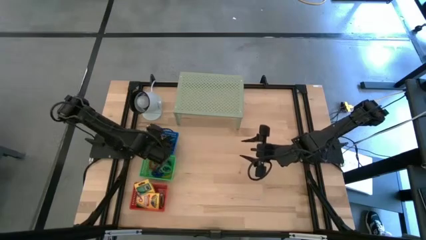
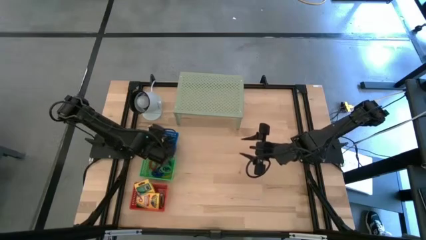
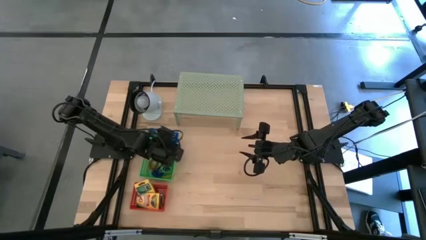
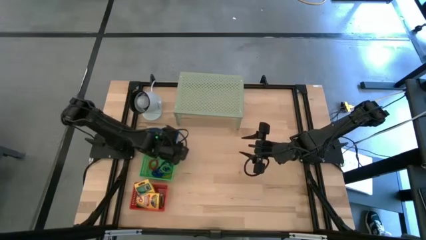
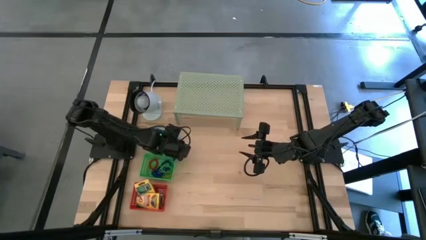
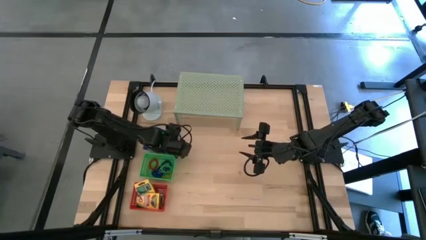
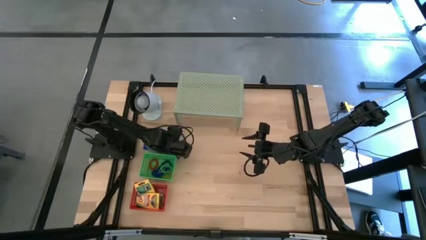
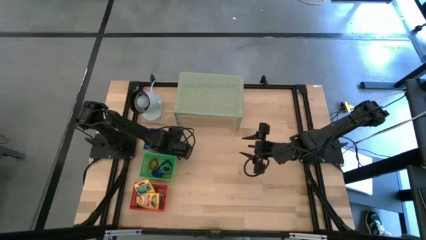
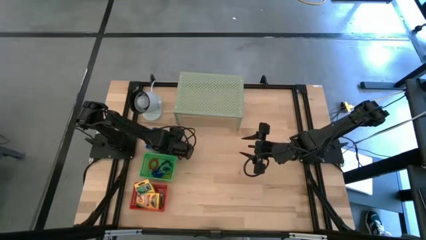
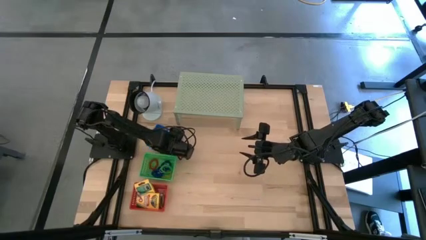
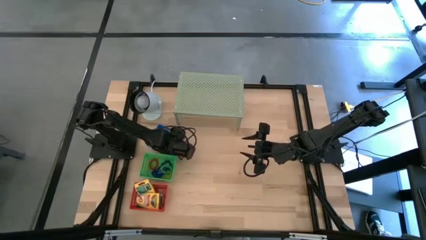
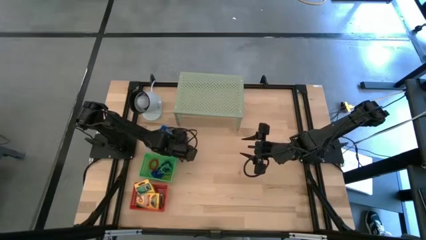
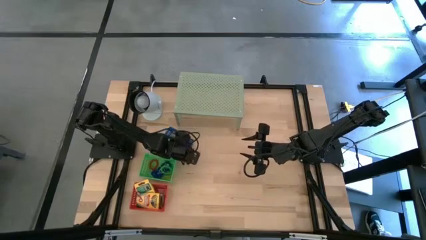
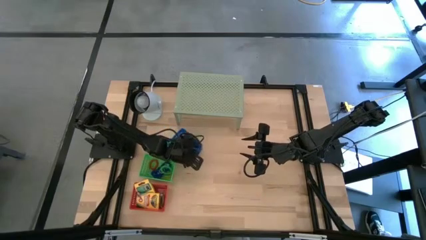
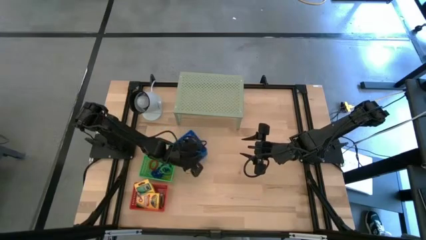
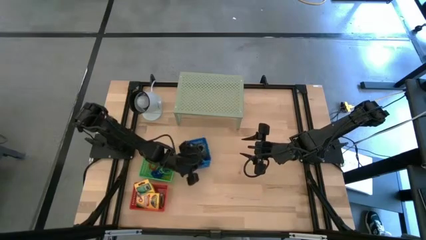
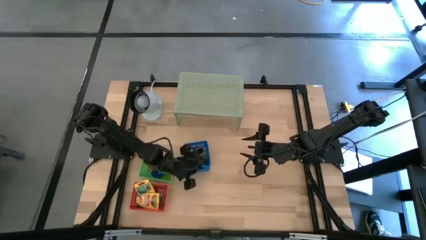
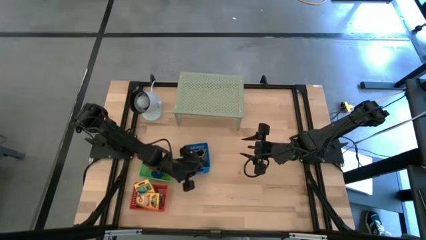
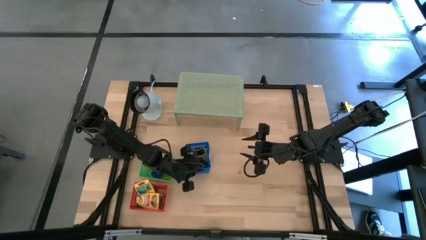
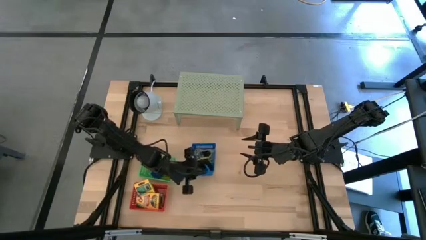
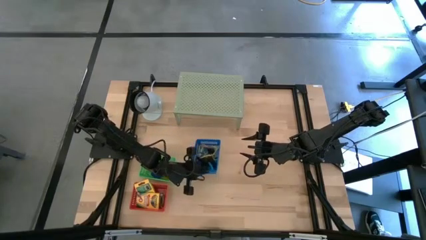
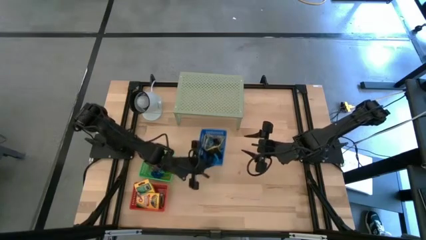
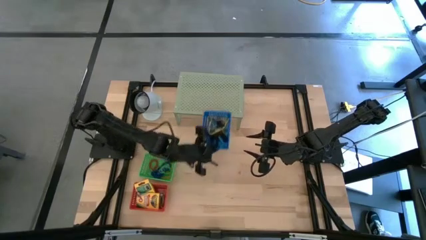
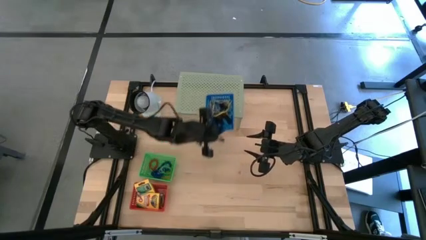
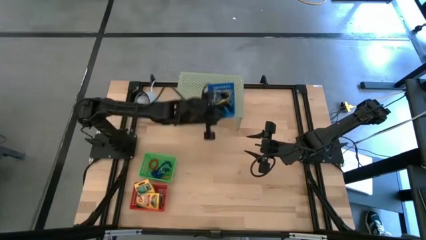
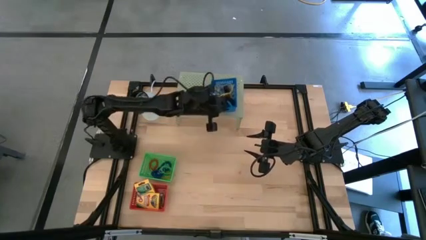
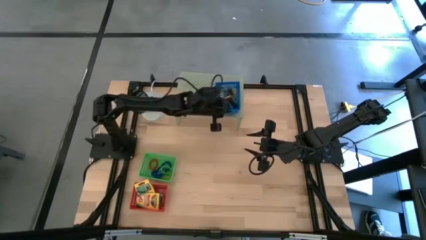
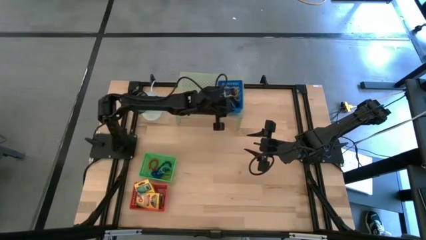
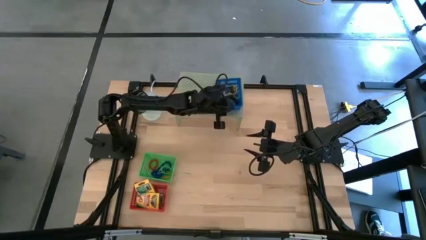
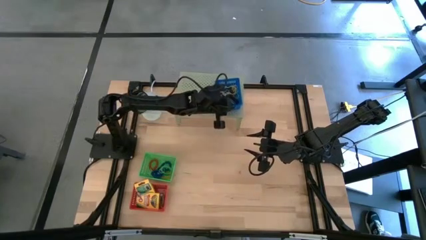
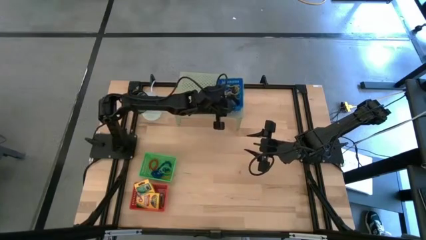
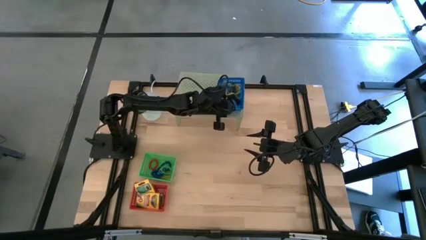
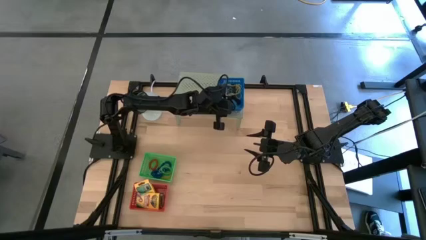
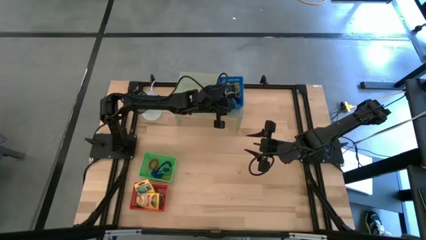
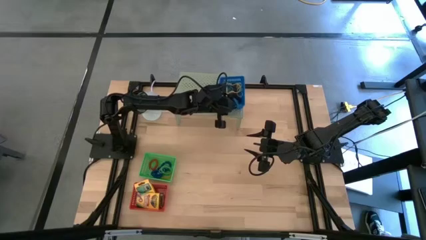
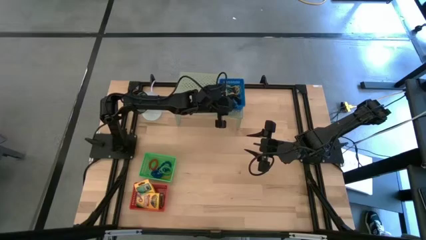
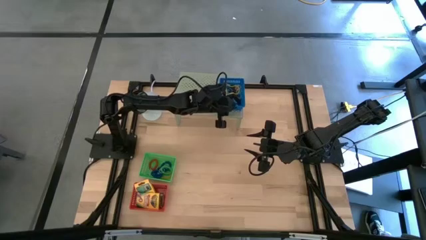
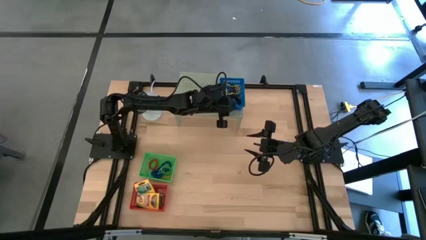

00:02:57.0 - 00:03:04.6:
Task: Pick & Place Office Desk Supplies
Put the blue bin on the shelf

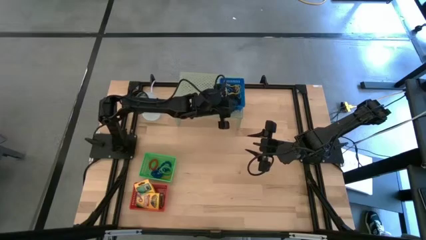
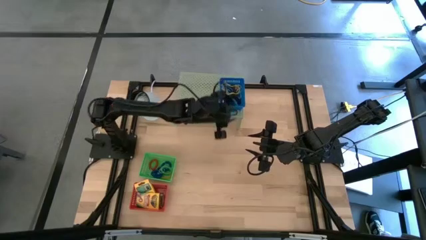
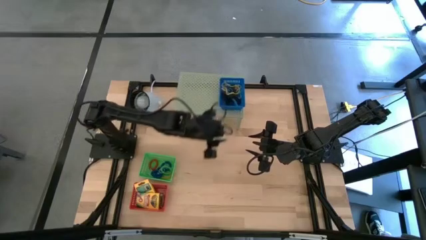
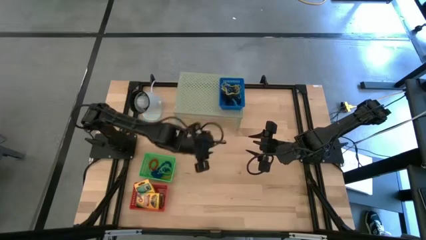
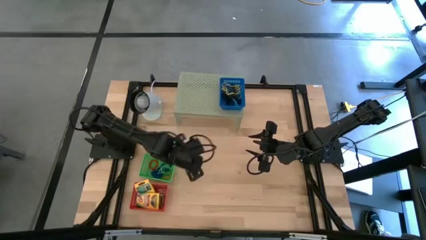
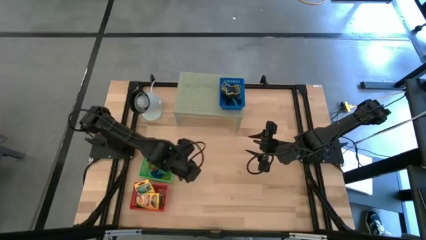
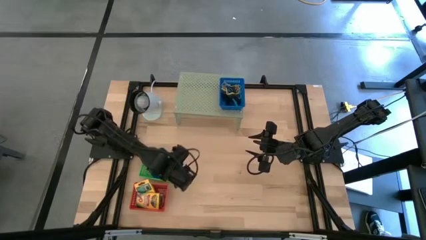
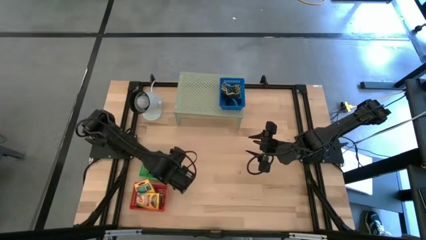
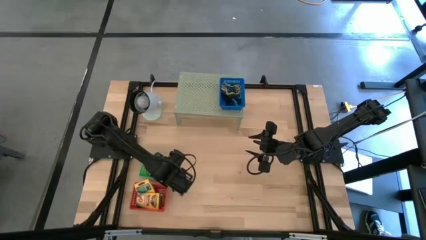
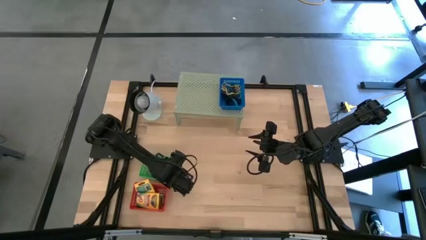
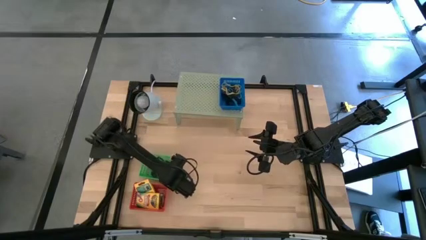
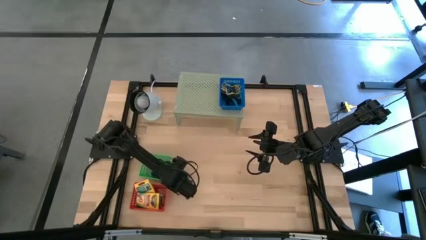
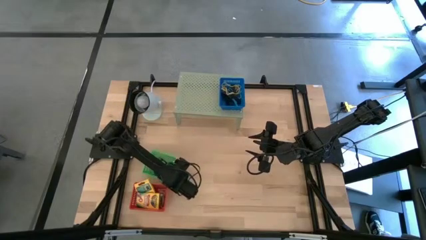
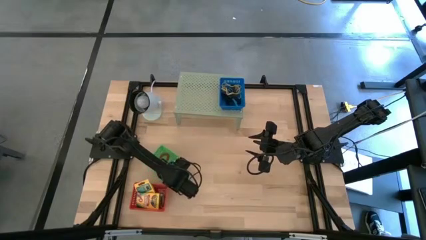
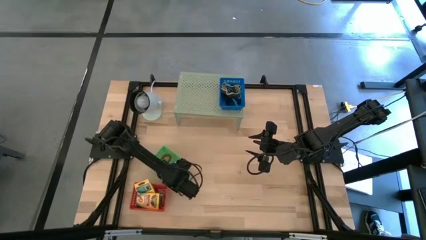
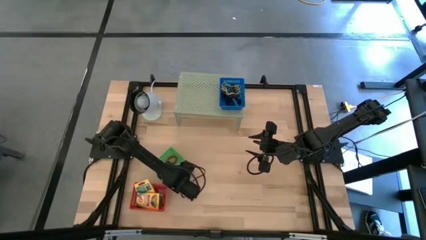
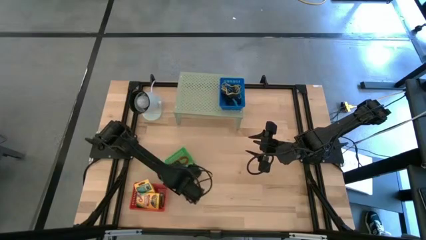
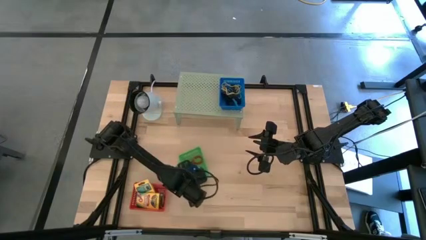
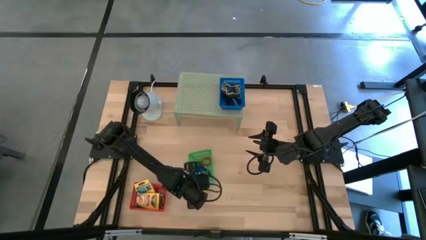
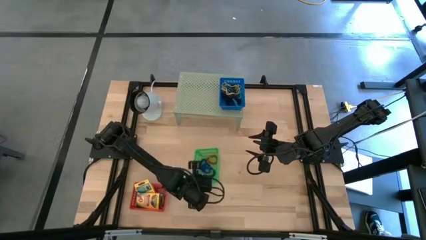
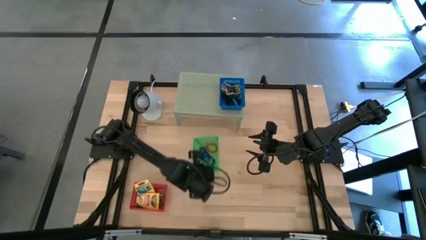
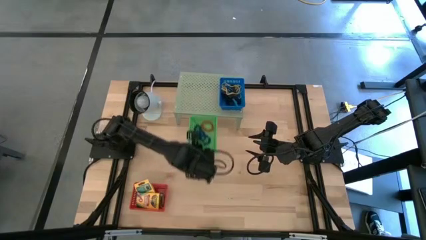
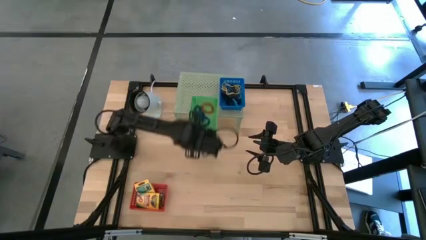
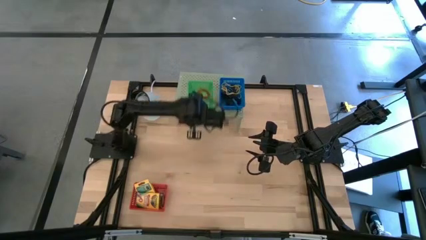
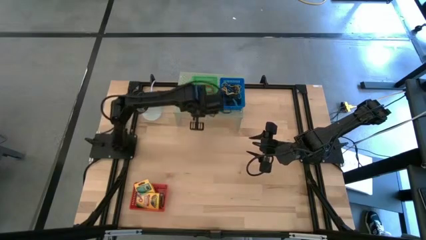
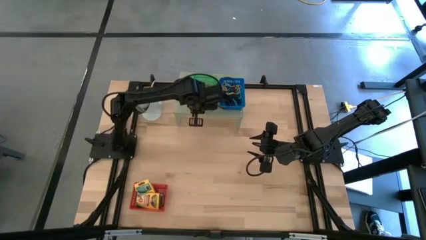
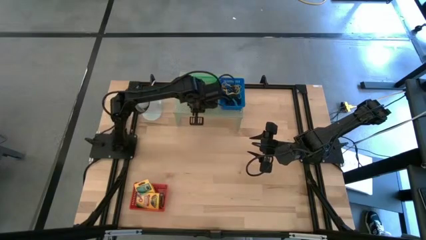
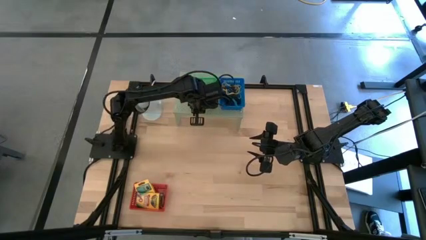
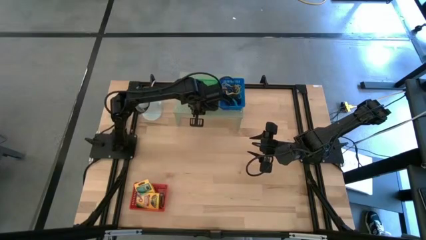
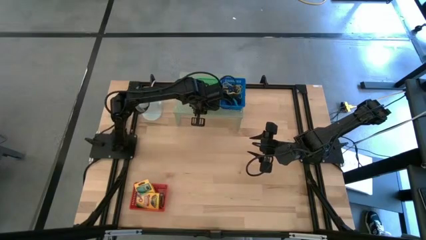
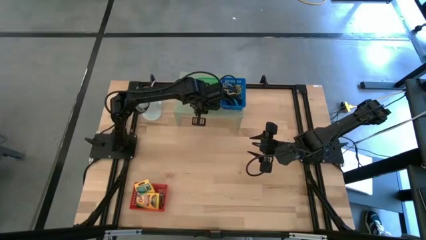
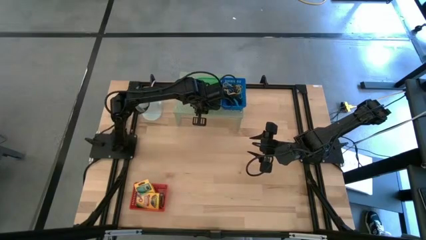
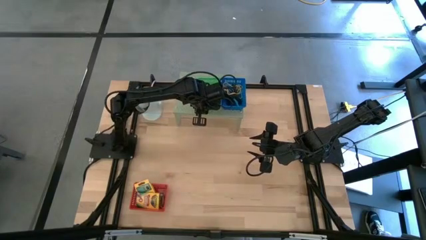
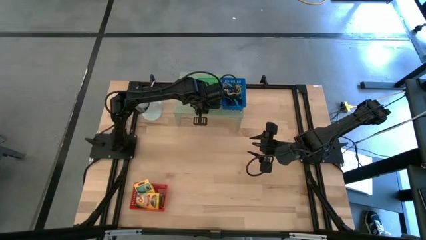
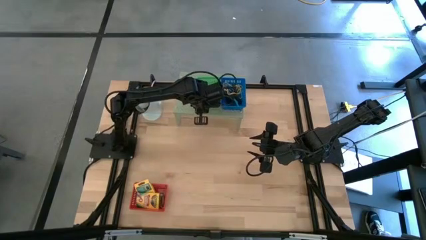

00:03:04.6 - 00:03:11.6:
Put the green bin on the shelf

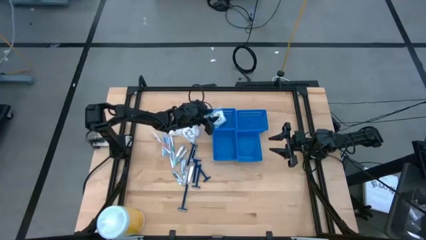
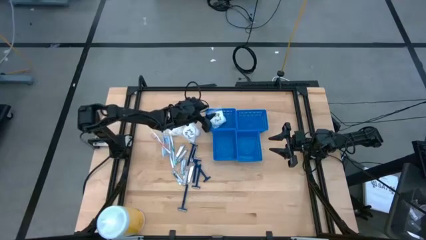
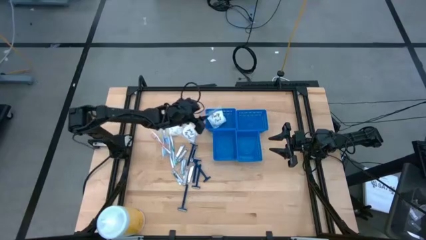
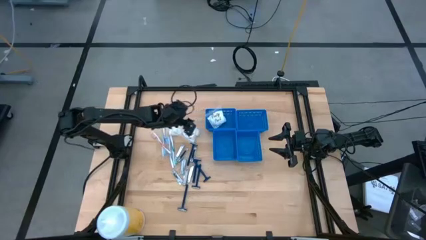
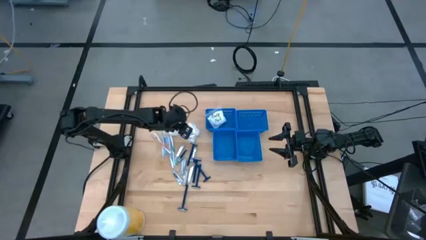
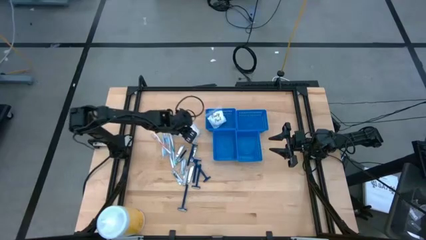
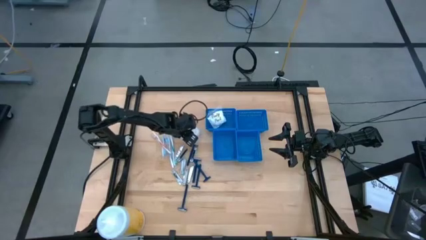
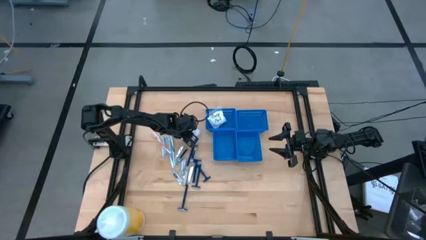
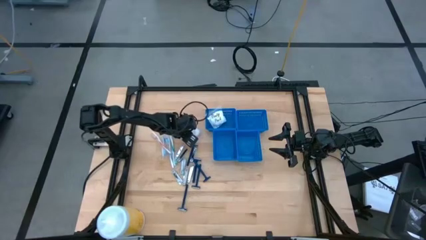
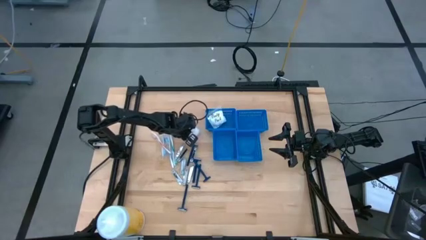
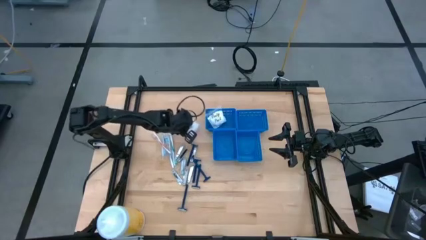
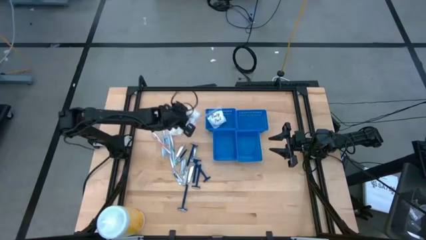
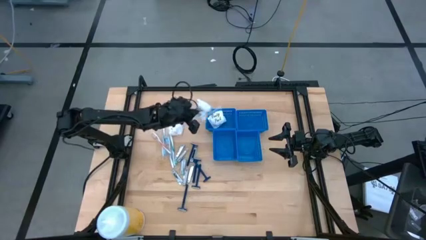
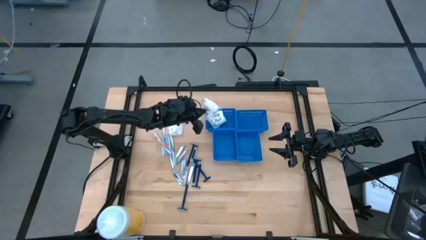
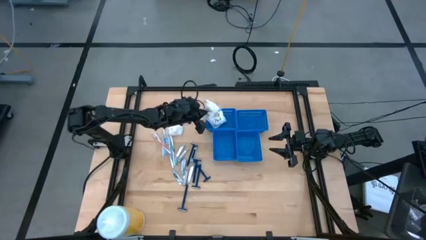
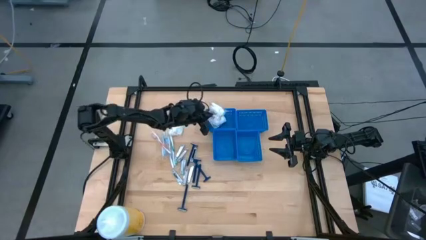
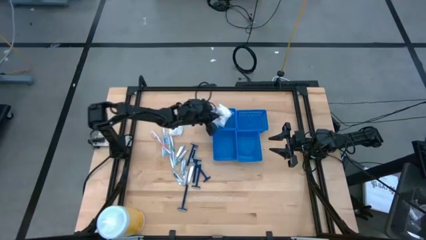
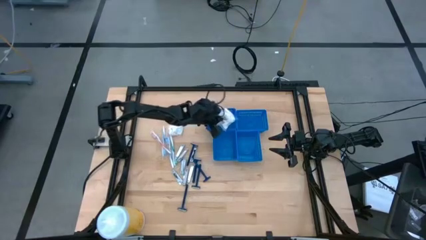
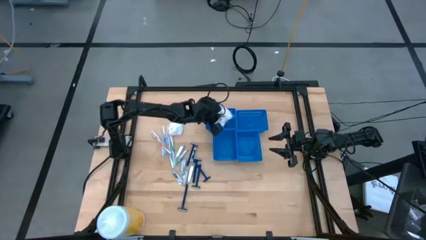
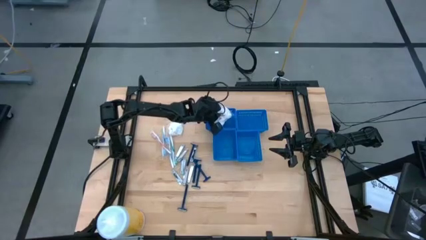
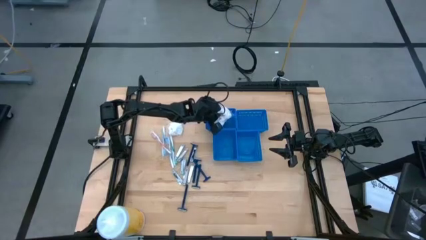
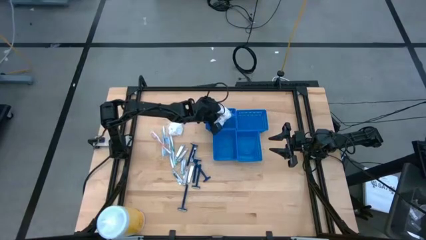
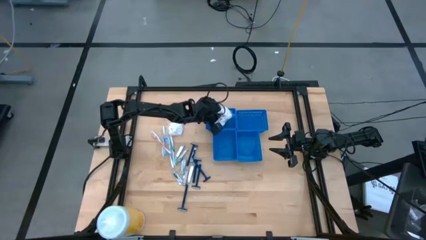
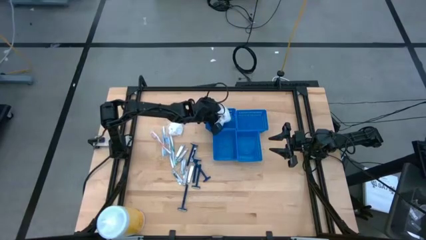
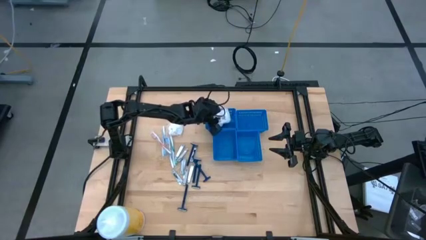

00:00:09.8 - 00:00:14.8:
Task: Pick & Place Travel size toiletries
Put the transparent cotton pack into the top left blue basket
